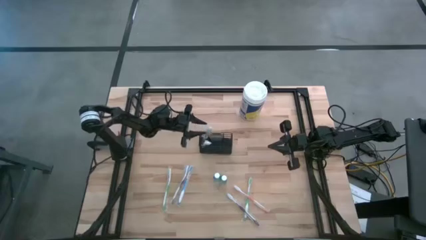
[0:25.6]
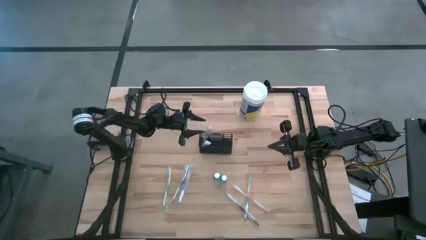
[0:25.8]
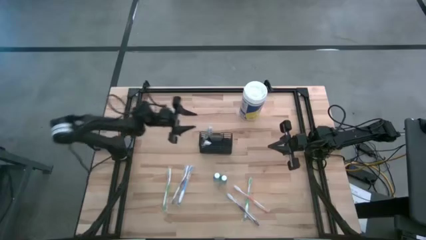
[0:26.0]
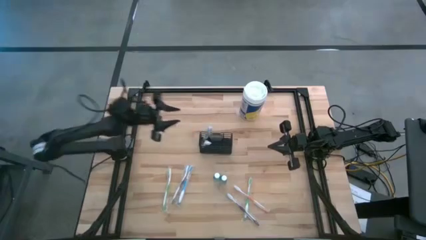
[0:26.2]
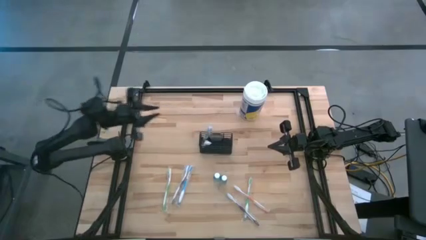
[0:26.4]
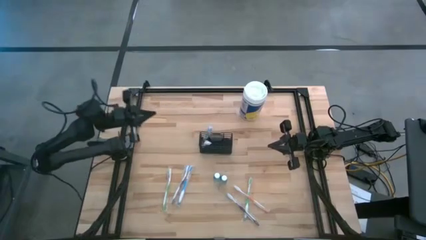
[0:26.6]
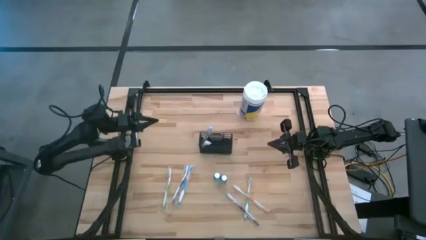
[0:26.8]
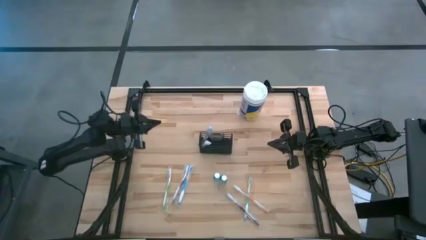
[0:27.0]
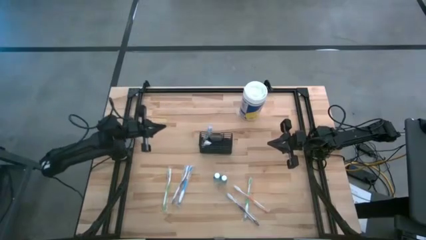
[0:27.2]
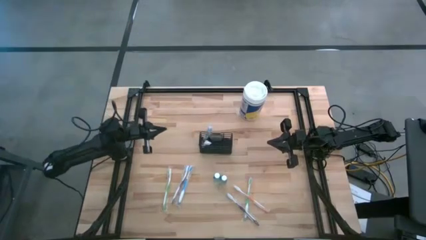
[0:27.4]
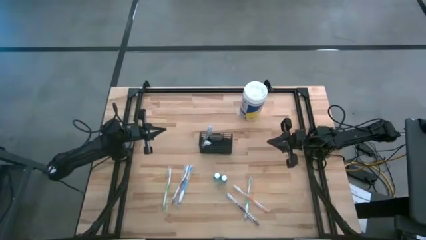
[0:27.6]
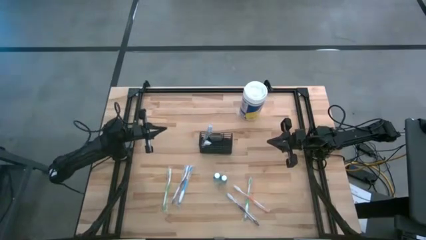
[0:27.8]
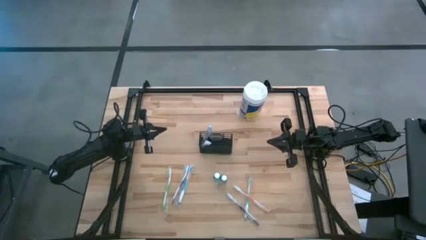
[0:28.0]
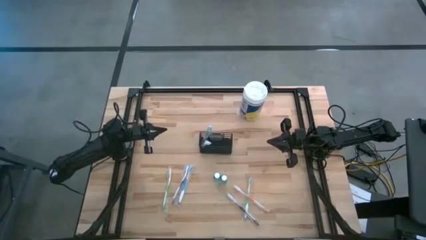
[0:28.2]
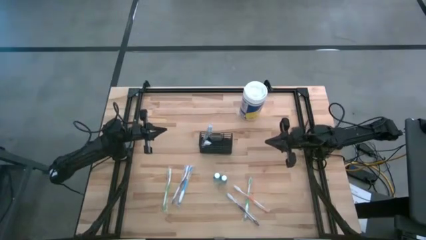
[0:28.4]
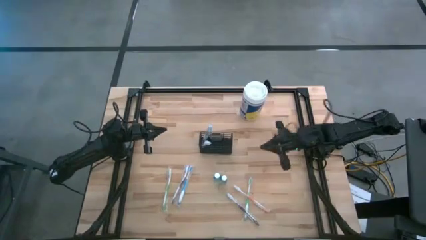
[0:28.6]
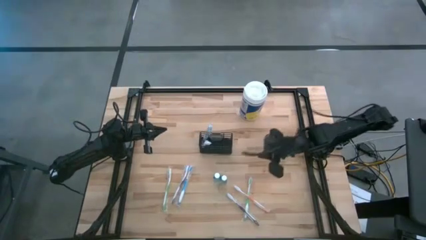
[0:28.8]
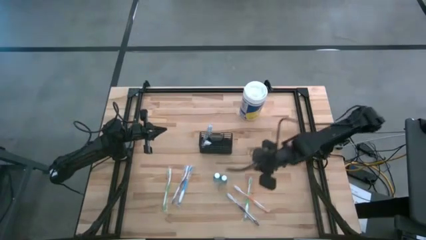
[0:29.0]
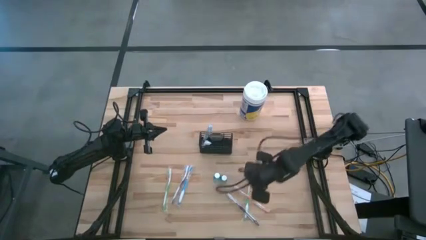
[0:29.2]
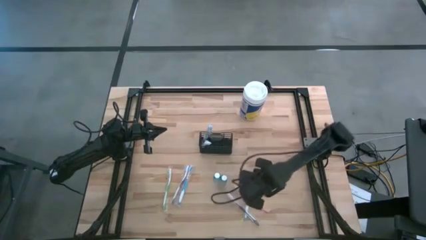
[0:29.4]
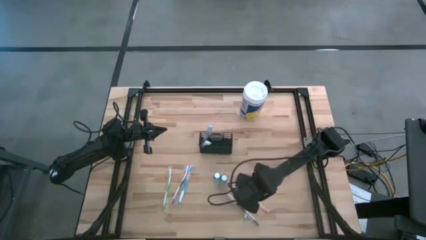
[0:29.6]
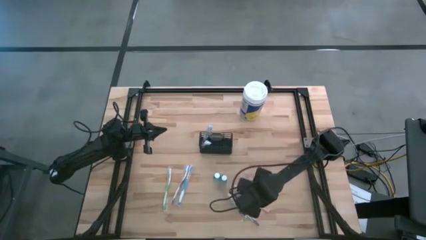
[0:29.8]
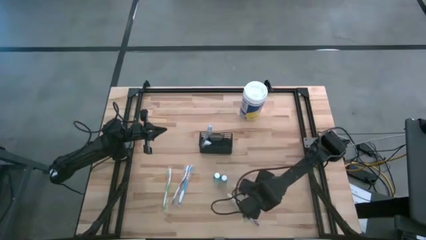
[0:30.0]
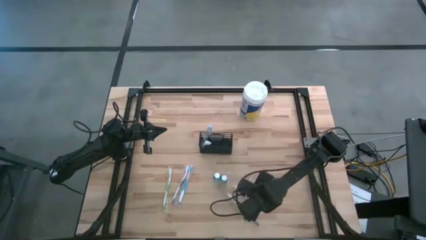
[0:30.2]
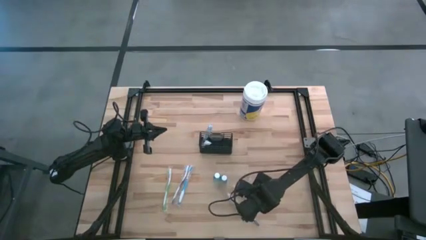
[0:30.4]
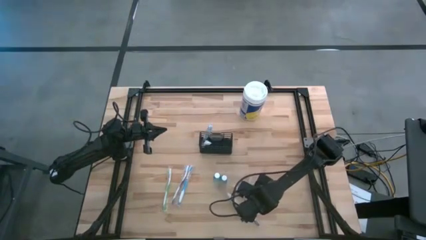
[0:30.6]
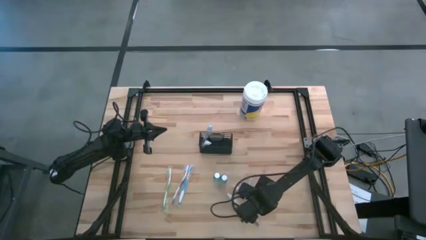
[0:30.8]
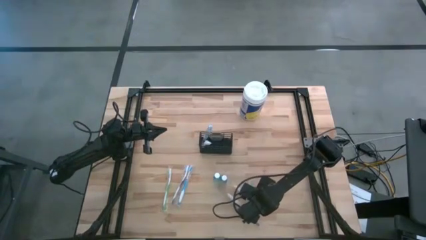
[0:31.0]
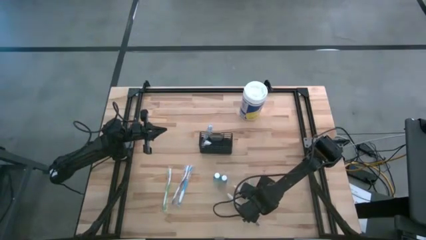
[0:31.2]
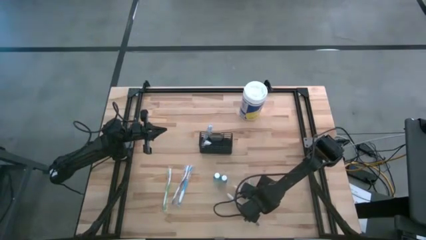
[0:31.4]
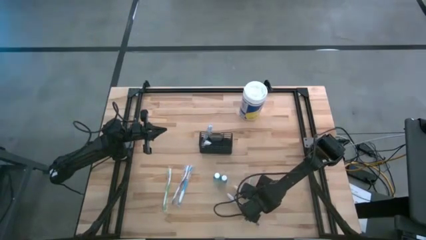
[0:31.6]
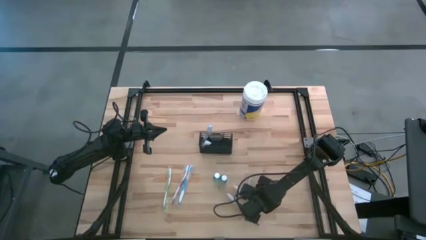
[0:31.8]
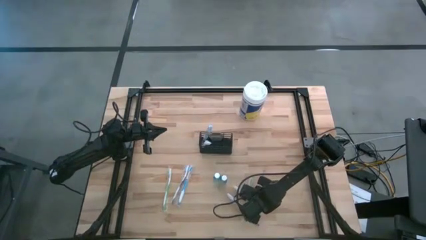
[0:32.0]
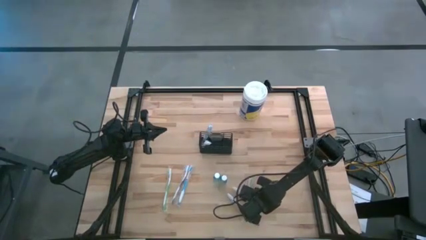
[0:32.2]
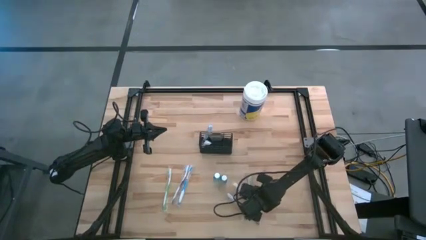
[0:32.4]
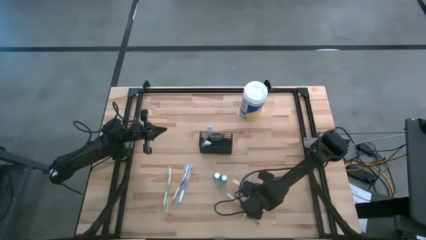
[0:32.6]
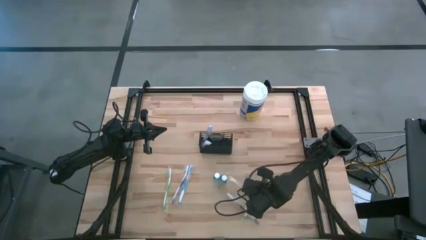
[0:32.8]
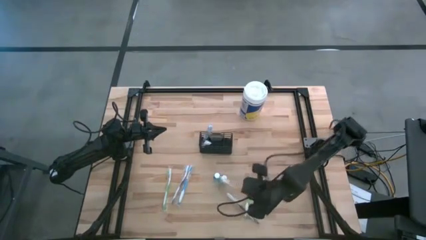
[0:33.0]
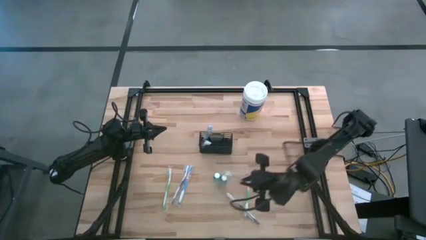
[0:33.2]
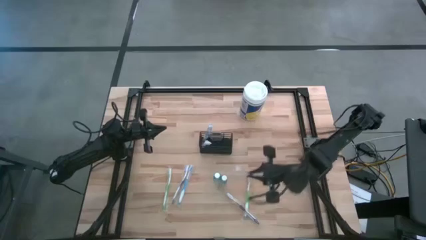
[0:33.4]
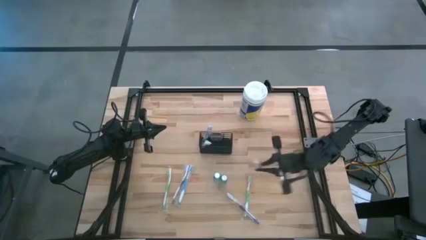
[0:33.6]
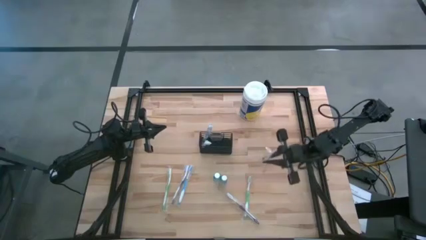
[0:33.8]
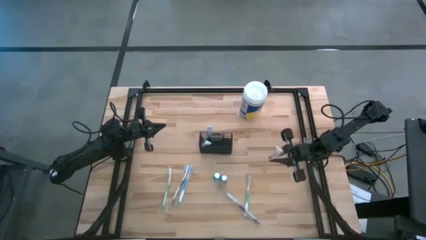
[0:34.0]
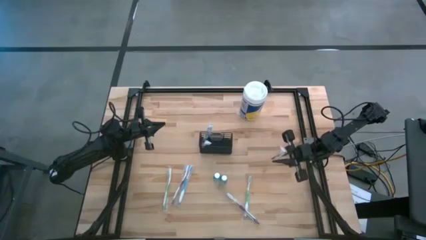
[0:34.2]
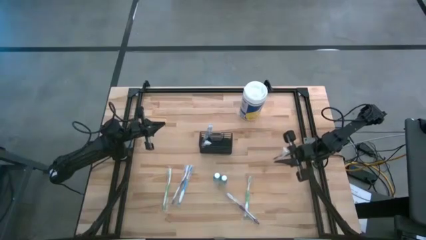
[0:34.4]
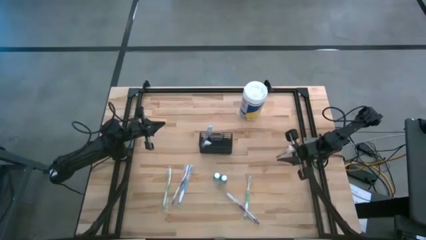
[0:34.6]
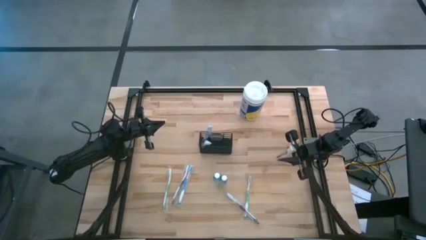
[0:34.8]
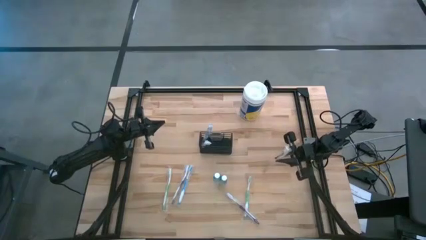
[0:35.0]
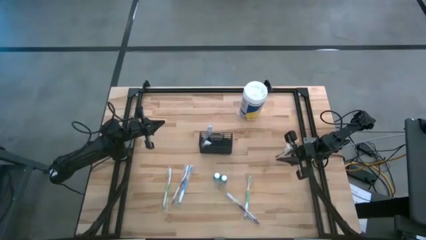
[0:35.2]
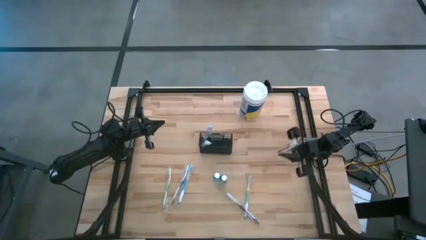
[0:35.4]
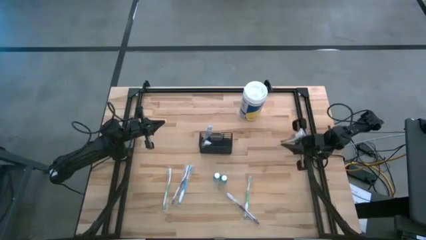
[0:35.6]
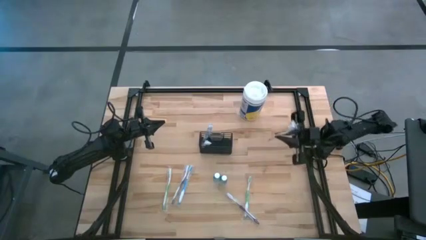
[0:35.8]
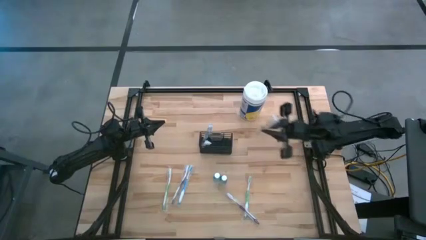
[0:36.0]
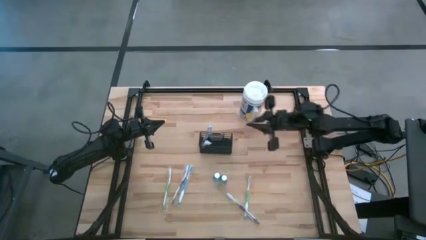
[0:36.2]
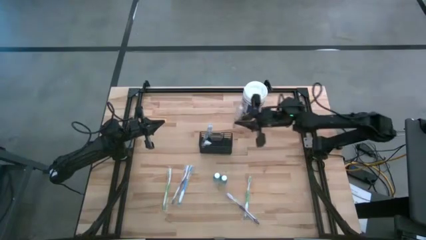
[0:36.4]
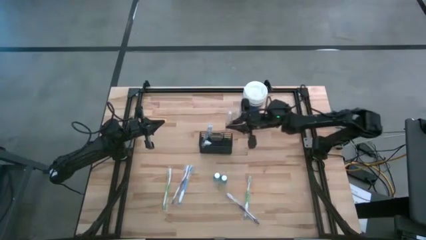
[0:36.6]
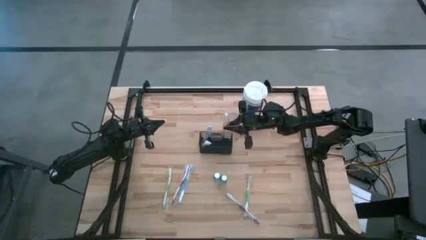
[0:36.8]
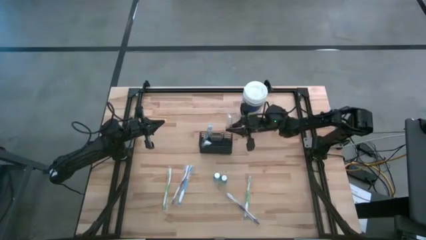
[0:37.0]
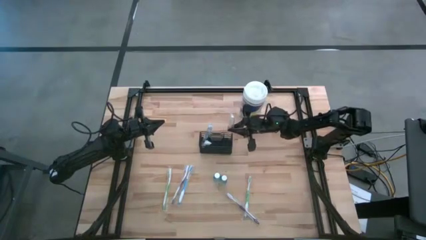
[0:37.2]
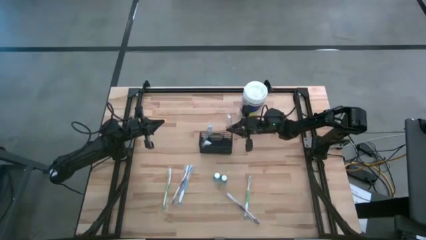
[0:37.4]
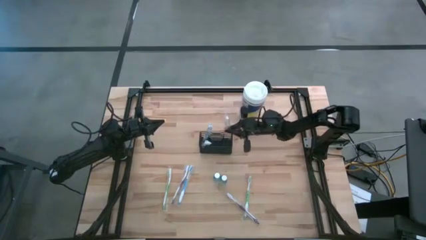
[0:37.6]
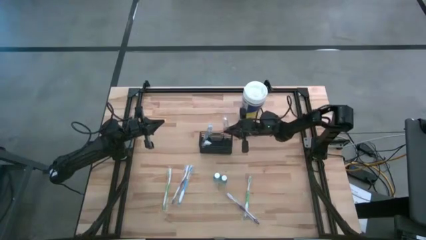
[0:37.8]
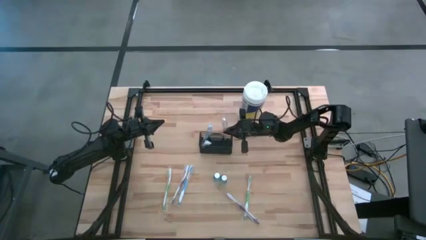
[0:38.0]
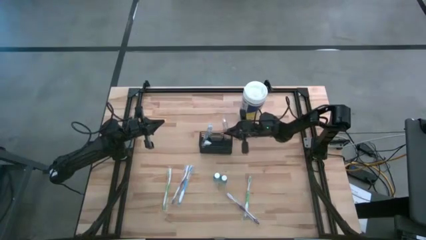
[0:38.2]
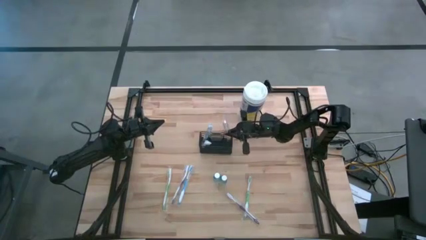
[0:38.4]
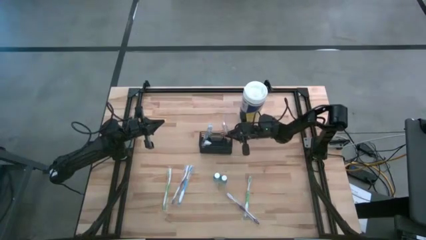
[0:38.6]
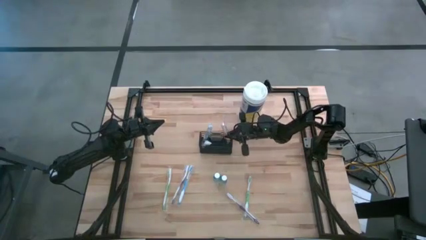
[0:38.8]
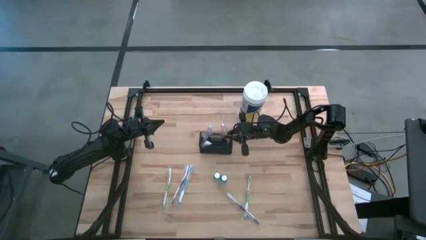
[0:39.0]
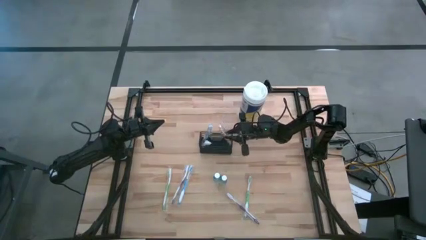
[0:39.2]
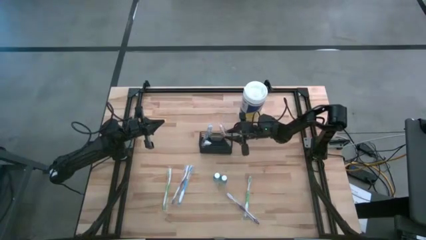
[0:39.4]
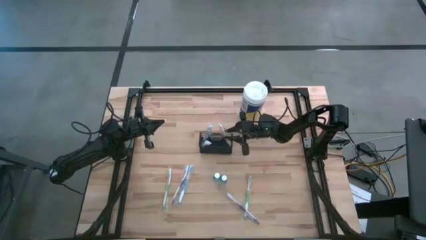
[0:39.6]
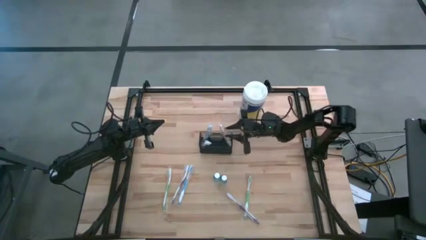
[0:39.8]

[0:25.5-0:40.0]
Task: Pick & Place toothbrushing station
Put the orange toothbrush into the black wire organizer
